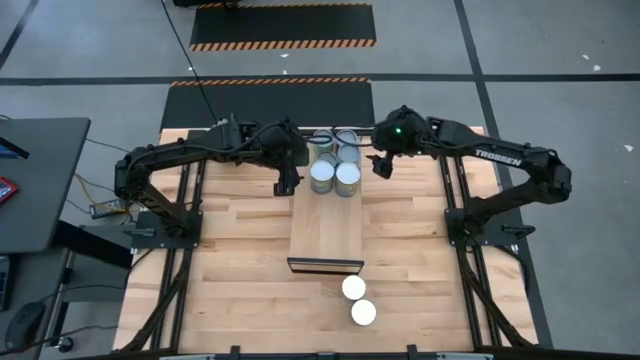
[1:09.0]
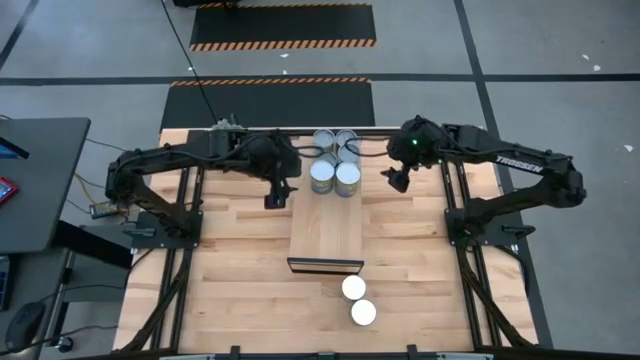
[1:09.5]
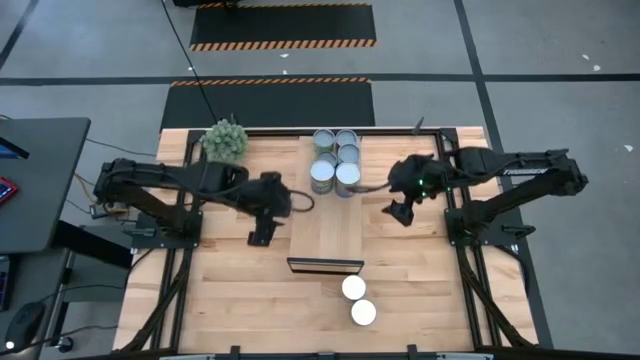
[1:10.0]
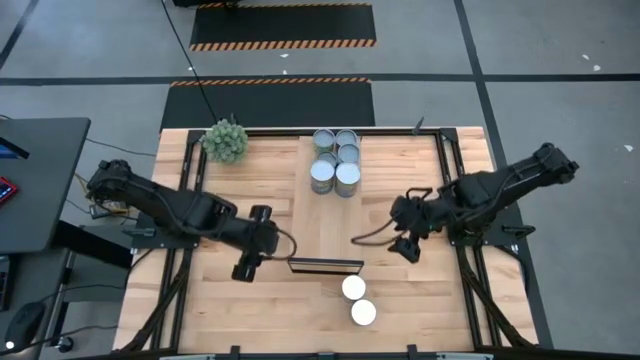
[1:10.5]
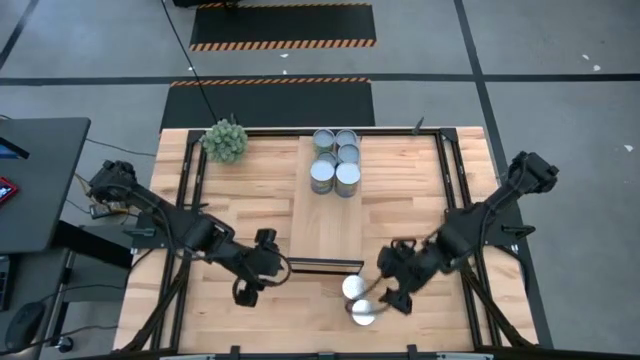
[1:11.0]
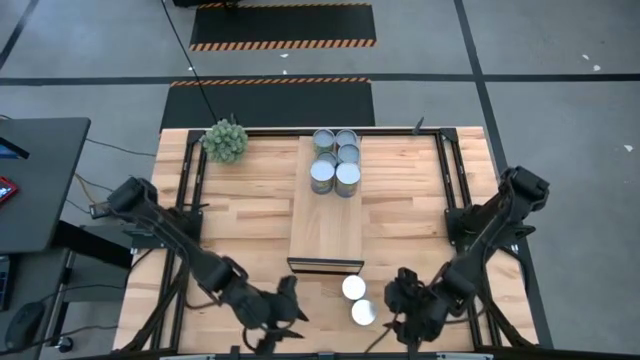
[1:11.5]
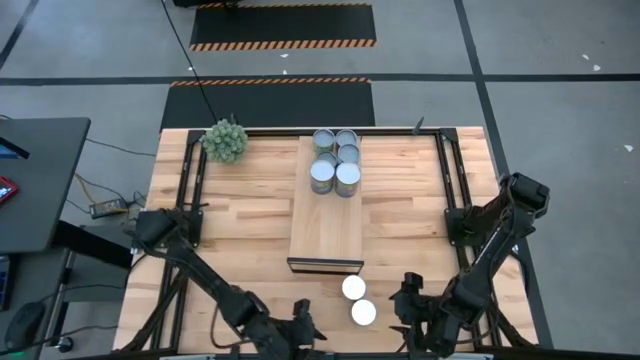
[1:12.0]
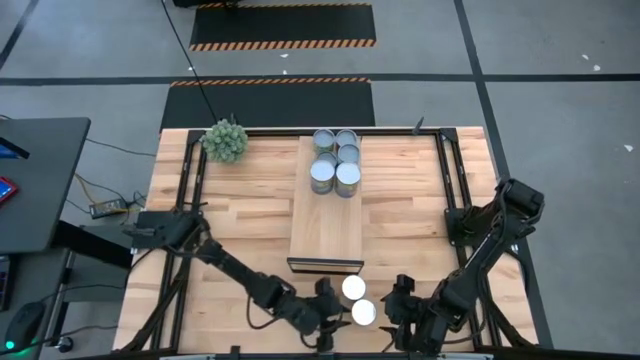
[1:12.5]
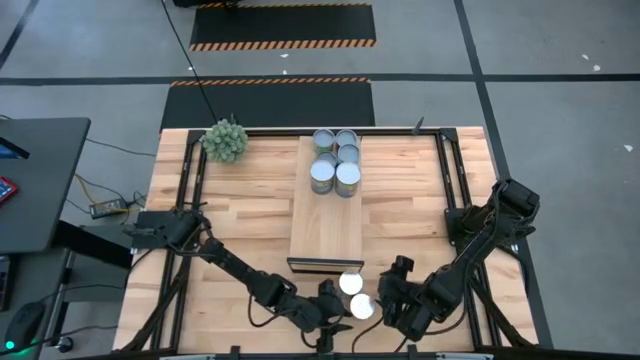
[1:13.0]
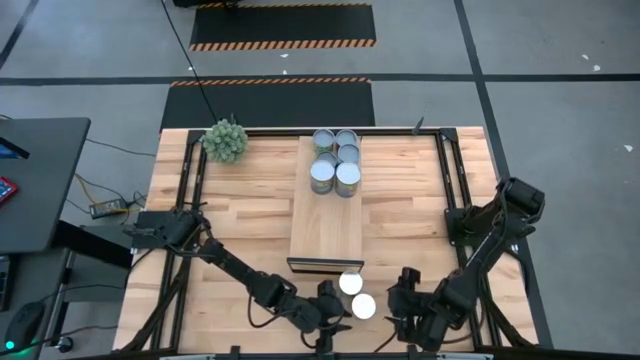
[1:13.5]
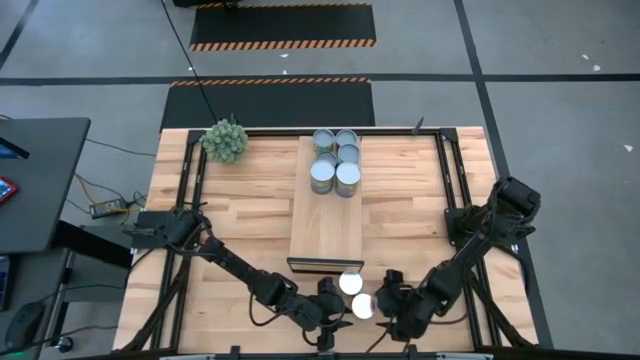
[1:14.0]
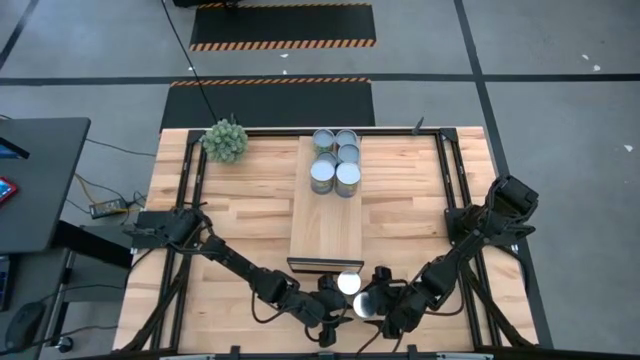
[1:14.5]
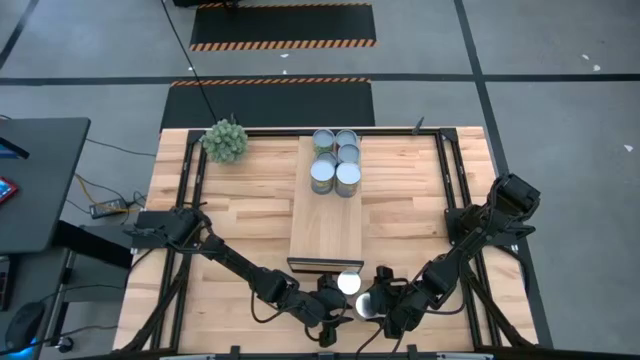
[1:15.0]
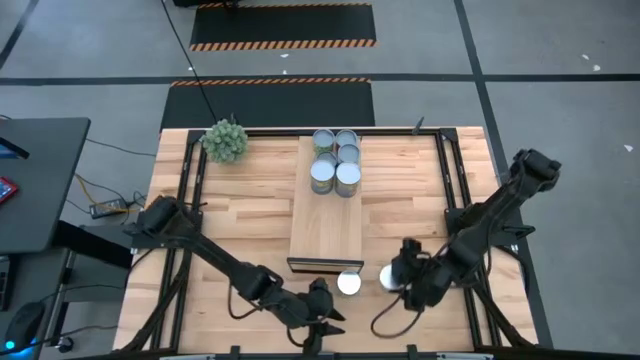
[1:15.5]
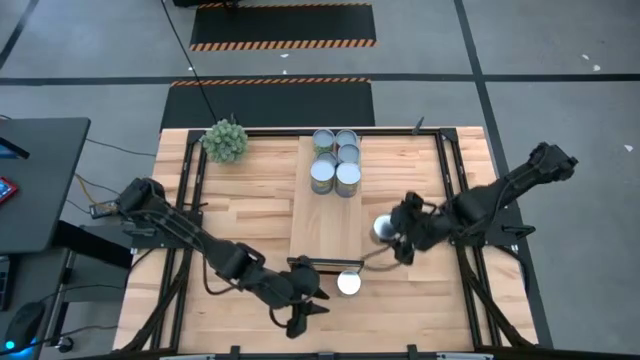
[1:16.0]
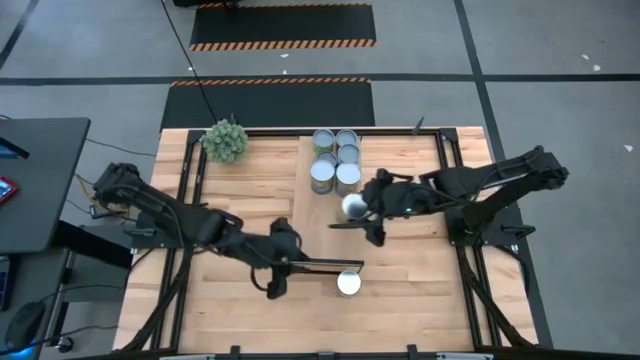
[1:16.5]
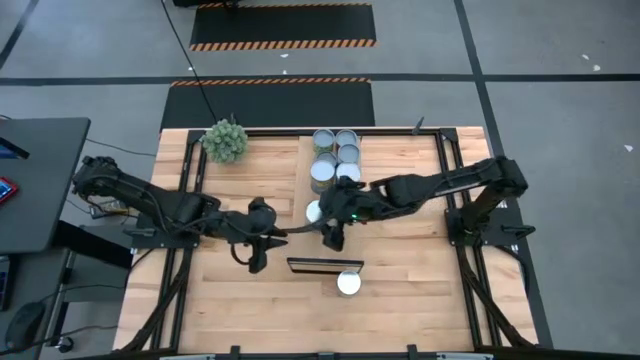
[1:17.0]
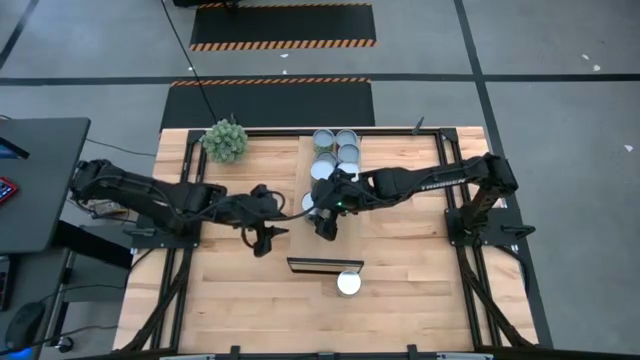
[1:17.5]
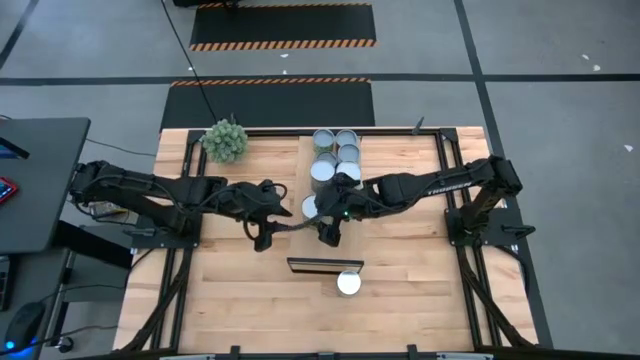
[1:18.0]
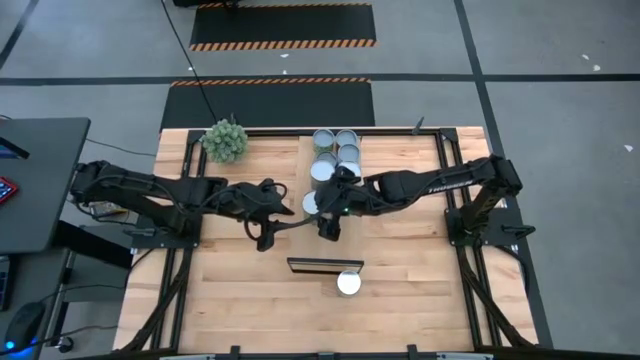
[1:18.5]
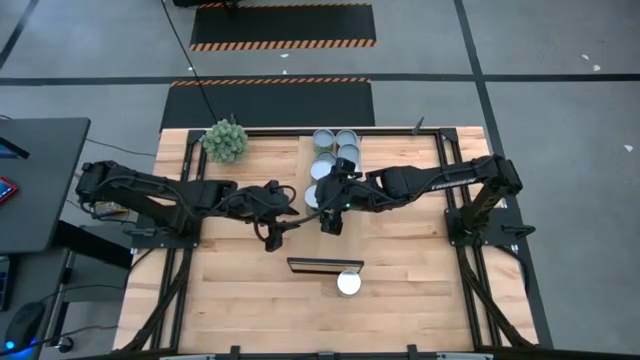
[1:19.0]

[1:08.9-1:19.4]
Task: Pick and place cans onto a shelf
Put the large canned oranges on the shelf

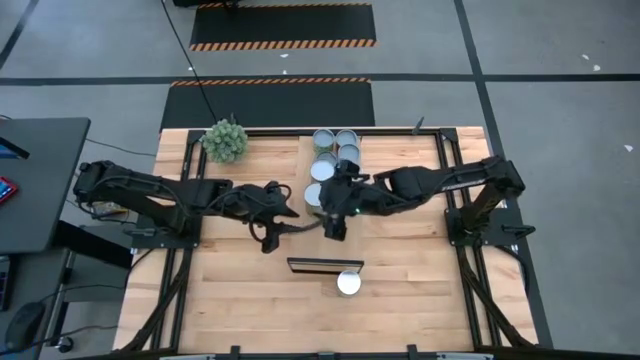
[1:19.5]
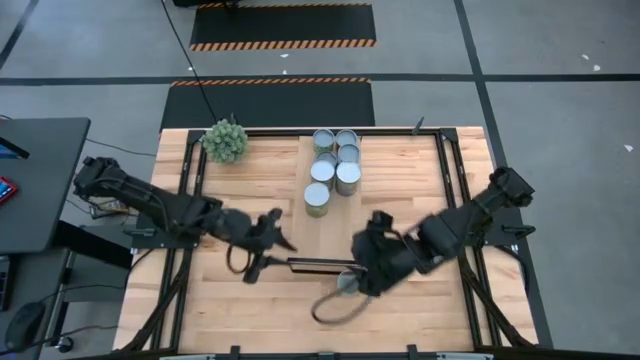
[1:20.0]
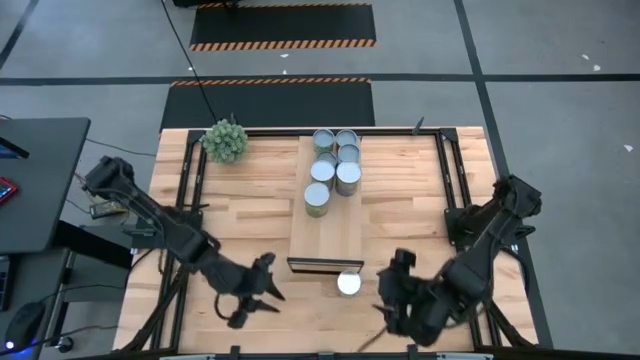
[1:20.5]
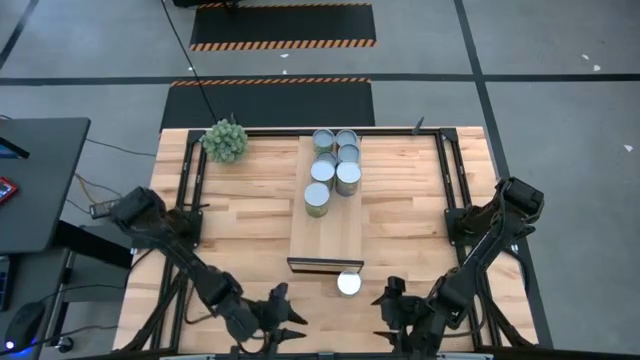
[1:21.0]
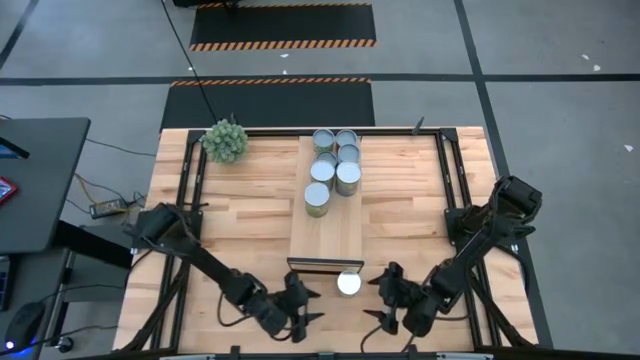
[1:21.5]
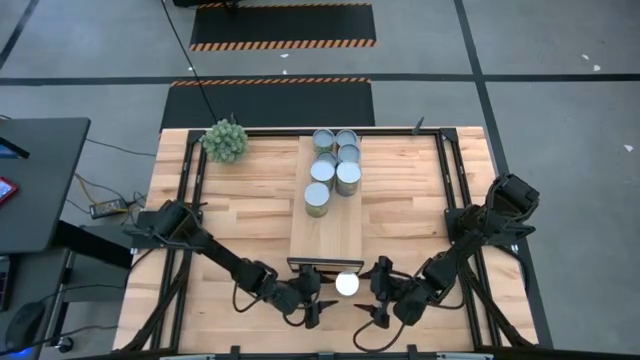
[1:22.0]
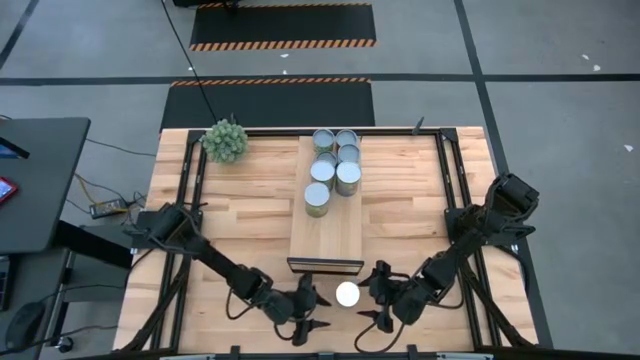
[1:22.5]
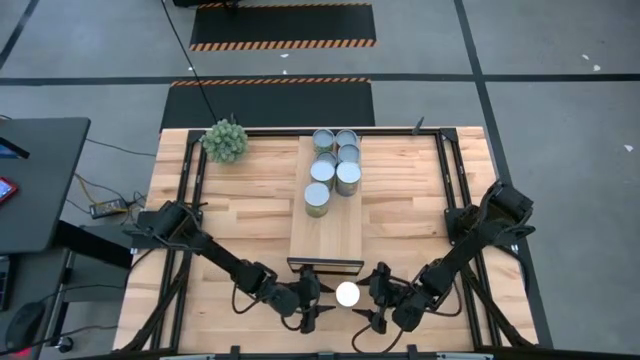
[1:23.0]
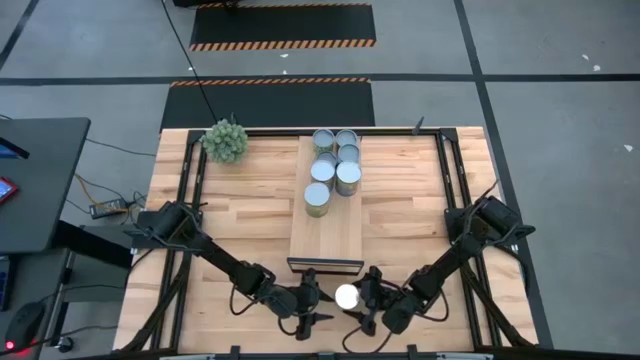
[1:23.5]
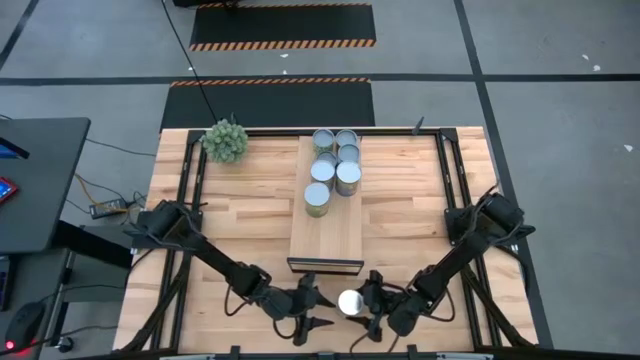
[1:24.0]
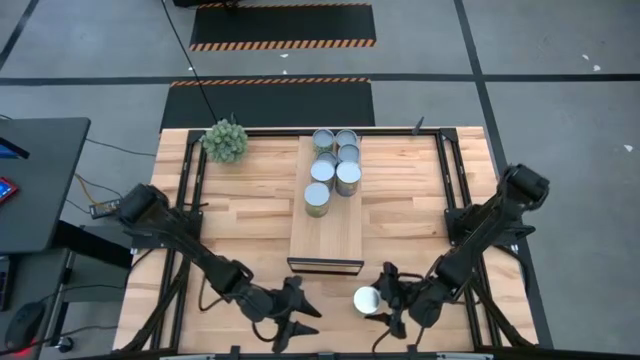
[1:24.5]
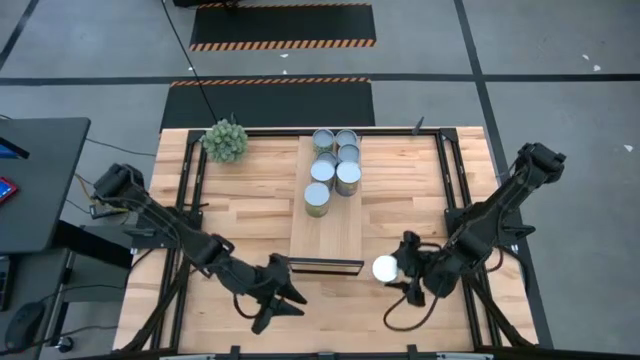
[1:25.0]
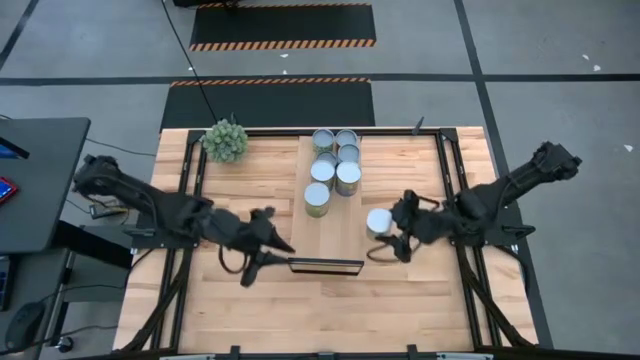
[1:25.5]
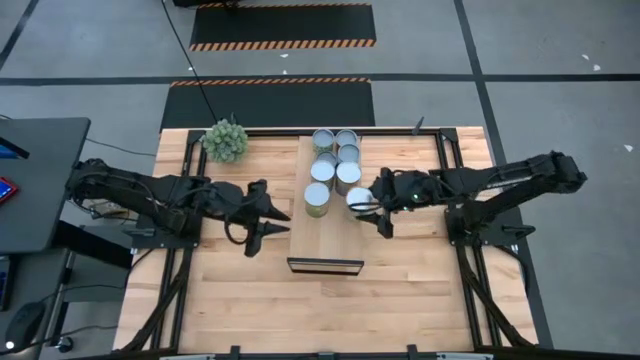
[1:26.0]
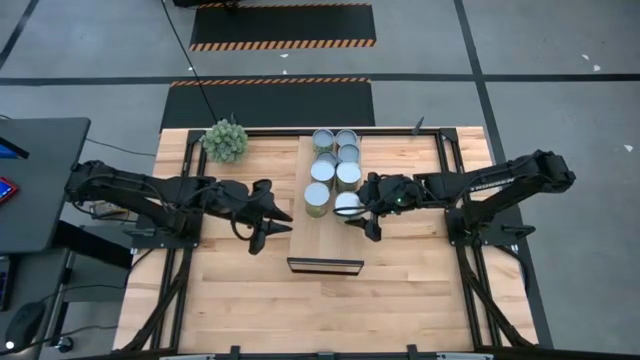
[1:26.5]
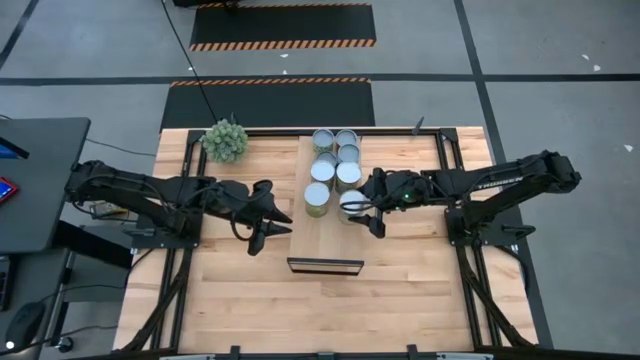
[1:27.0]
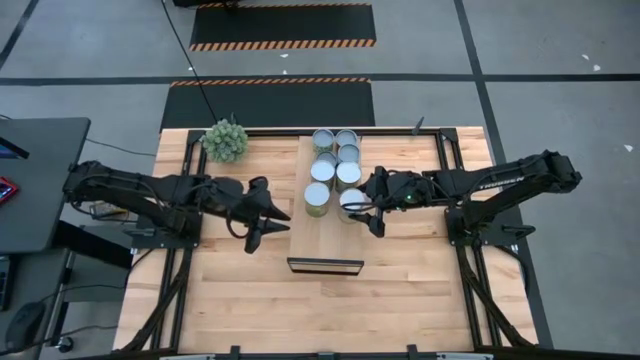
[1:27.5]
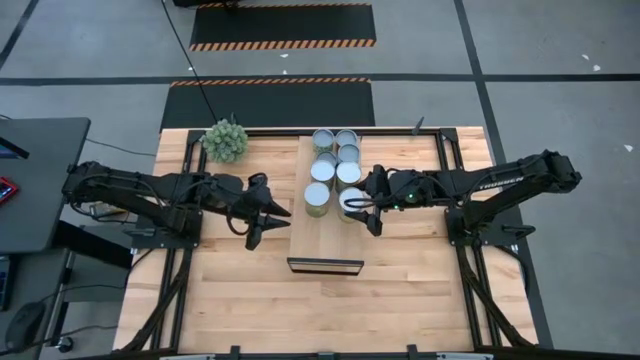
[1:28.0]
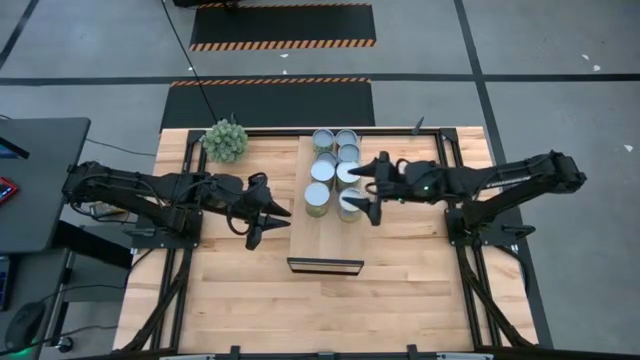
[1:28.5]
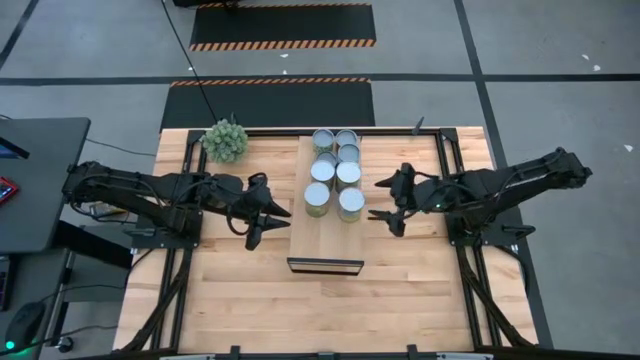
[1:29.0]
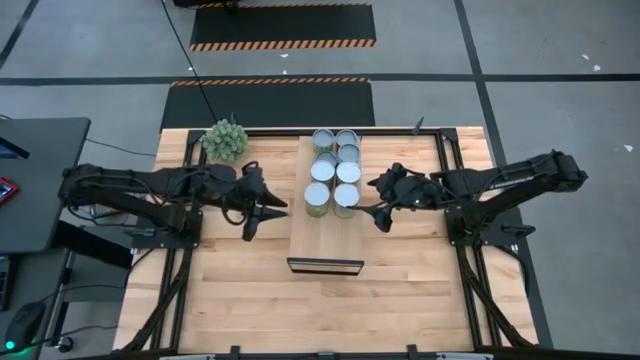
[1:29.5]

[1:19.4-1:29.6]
Put the large canned carrots on the shelf
